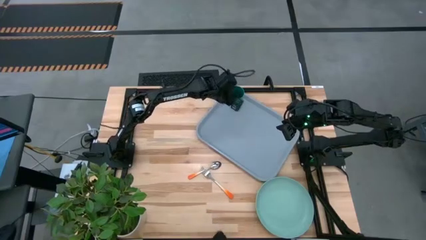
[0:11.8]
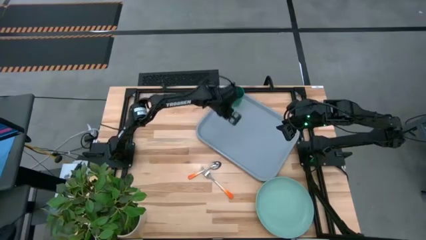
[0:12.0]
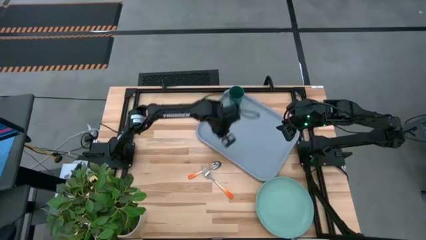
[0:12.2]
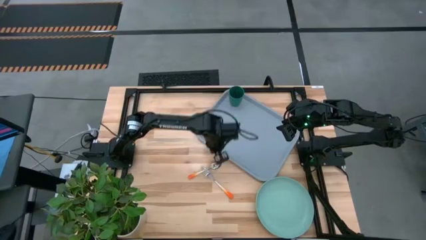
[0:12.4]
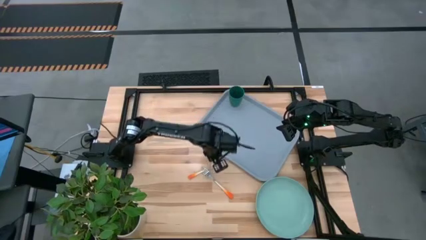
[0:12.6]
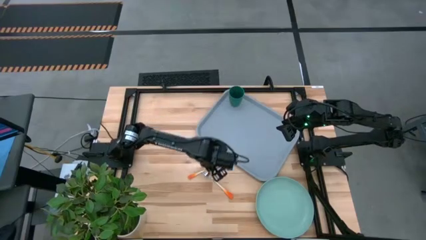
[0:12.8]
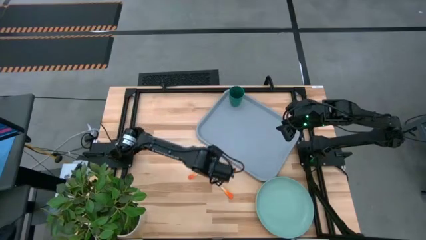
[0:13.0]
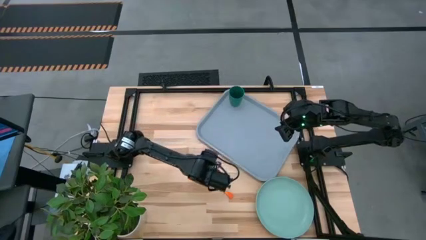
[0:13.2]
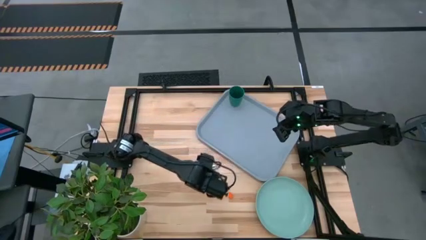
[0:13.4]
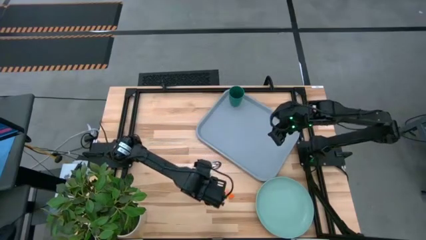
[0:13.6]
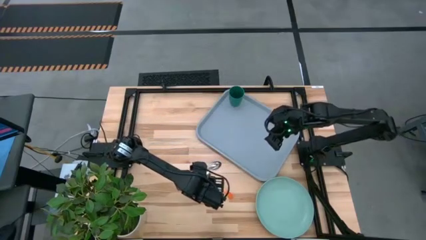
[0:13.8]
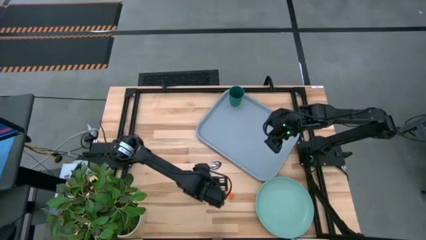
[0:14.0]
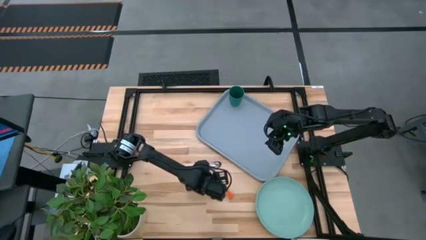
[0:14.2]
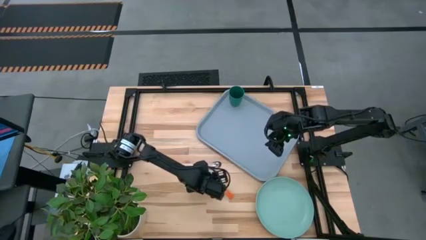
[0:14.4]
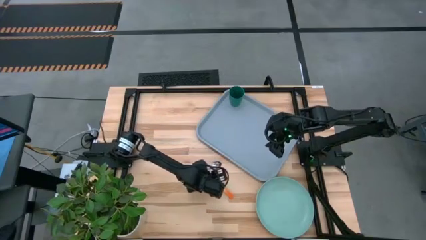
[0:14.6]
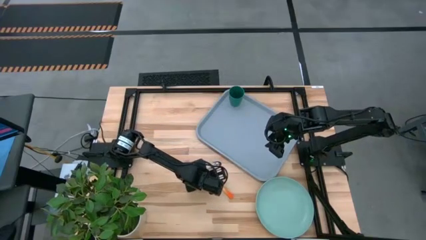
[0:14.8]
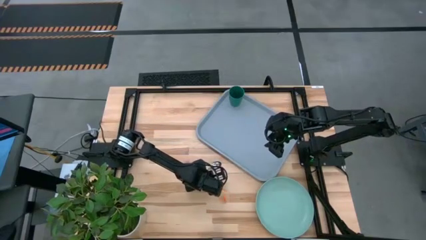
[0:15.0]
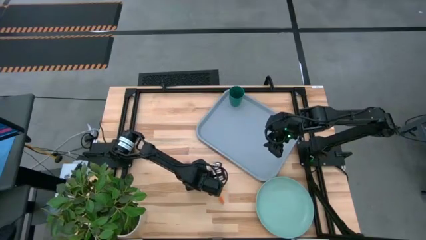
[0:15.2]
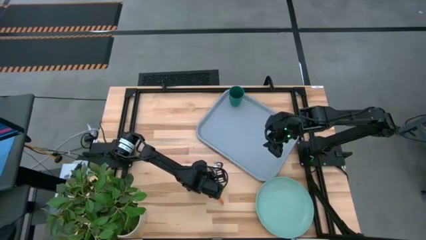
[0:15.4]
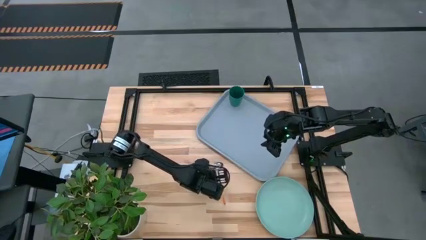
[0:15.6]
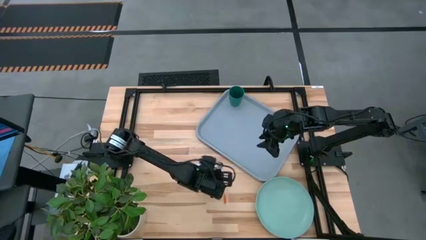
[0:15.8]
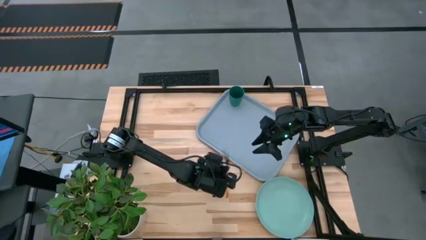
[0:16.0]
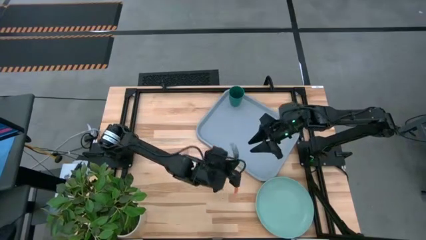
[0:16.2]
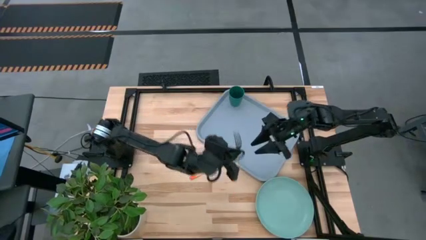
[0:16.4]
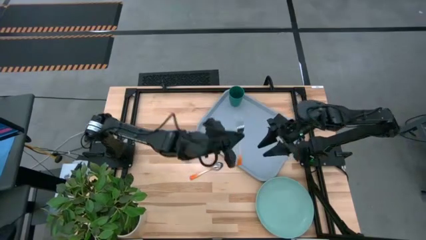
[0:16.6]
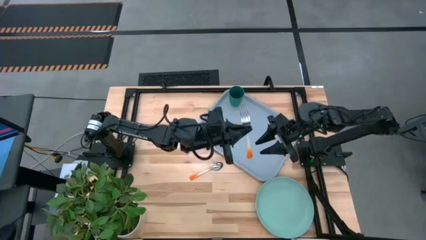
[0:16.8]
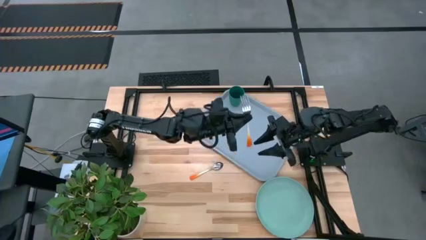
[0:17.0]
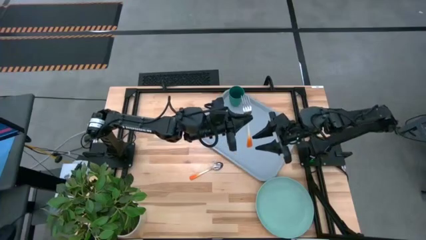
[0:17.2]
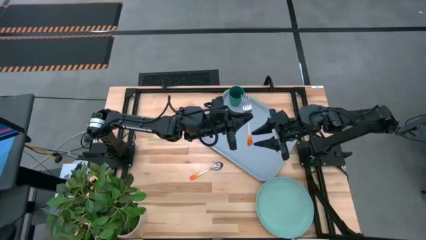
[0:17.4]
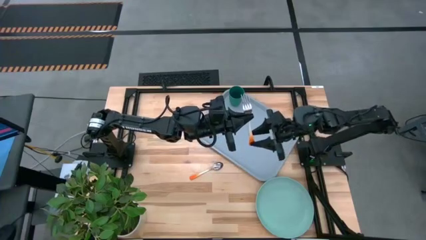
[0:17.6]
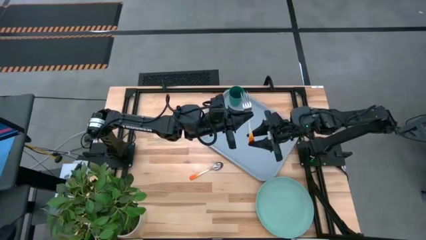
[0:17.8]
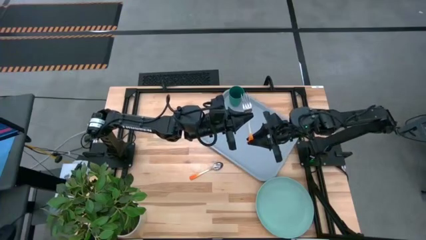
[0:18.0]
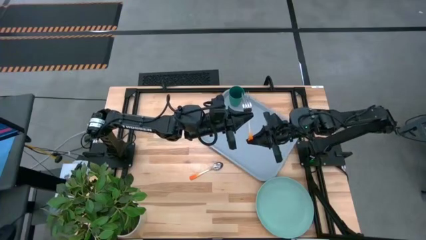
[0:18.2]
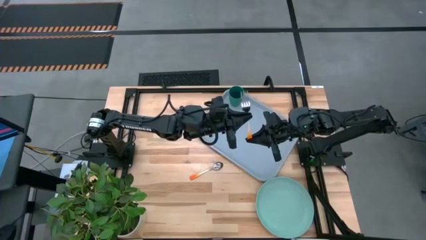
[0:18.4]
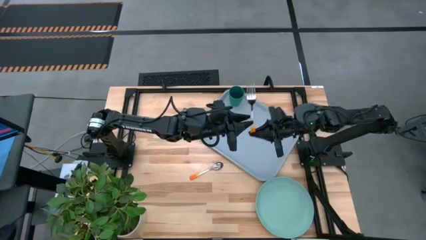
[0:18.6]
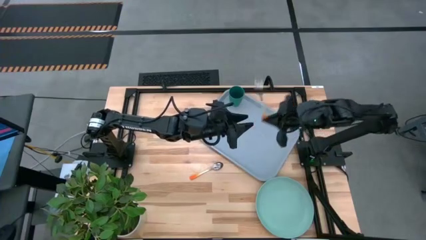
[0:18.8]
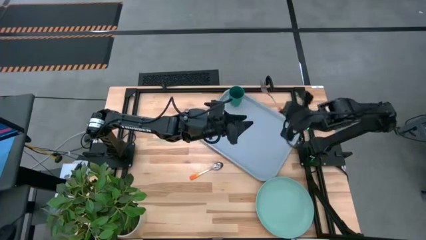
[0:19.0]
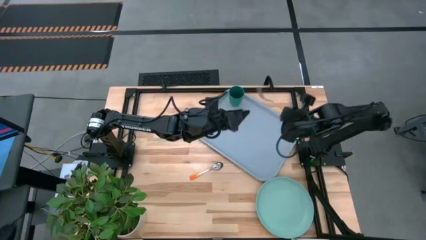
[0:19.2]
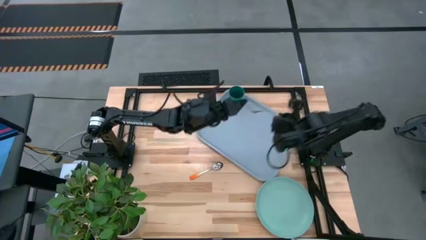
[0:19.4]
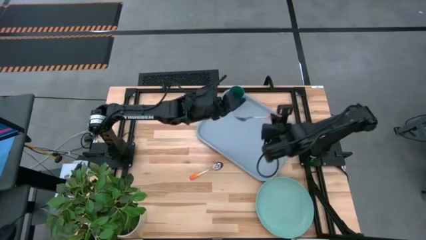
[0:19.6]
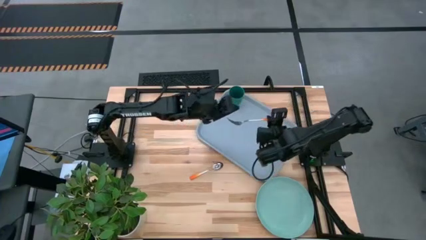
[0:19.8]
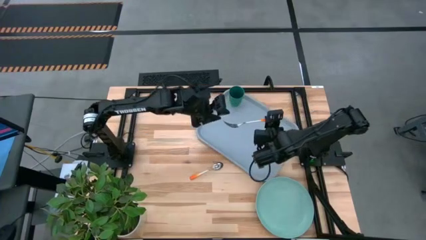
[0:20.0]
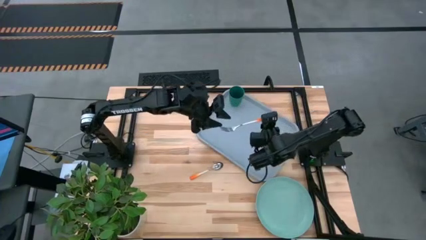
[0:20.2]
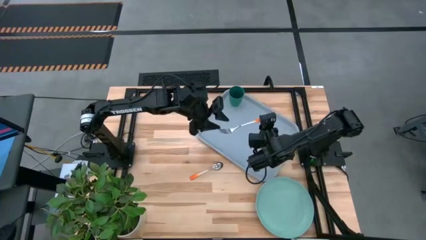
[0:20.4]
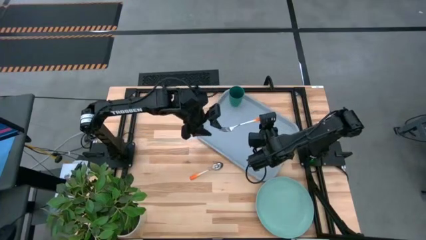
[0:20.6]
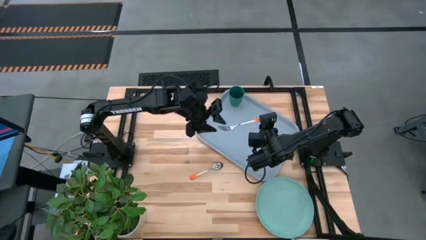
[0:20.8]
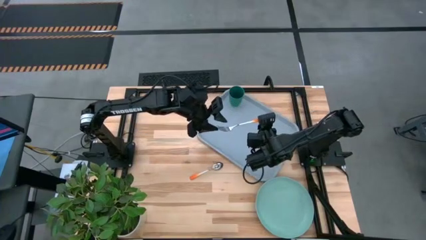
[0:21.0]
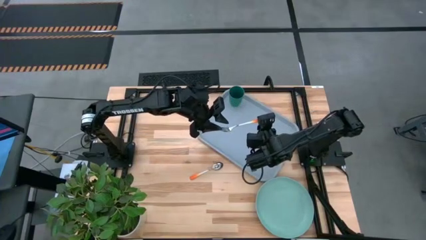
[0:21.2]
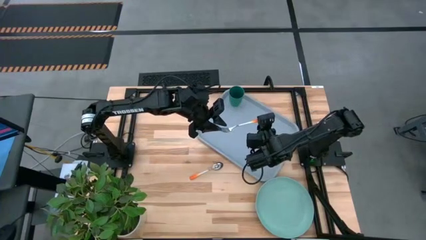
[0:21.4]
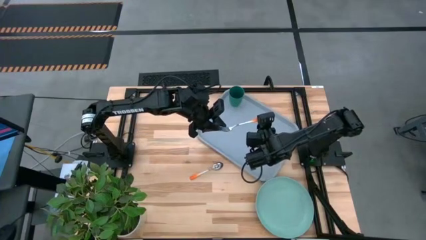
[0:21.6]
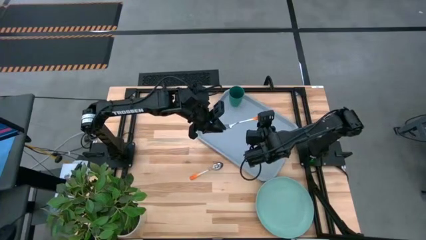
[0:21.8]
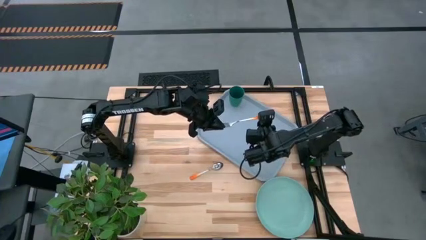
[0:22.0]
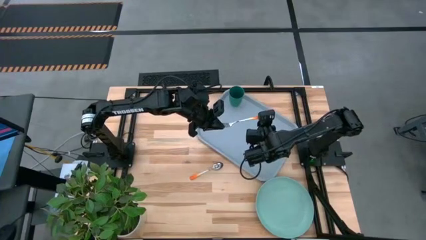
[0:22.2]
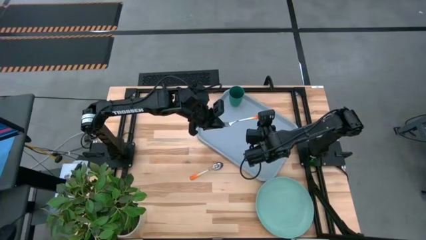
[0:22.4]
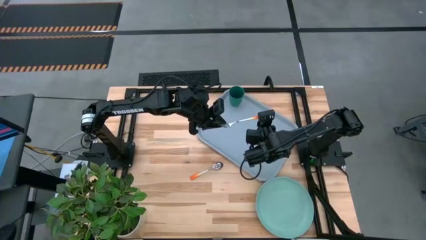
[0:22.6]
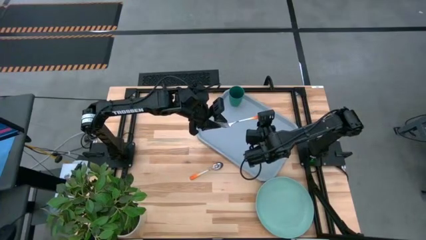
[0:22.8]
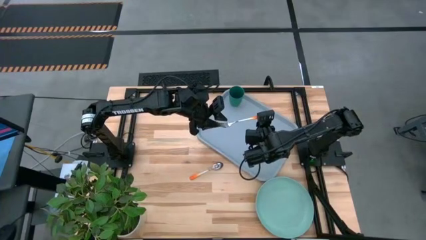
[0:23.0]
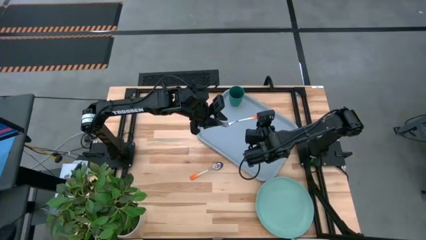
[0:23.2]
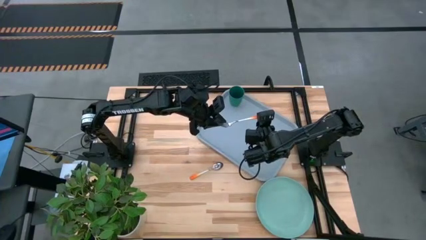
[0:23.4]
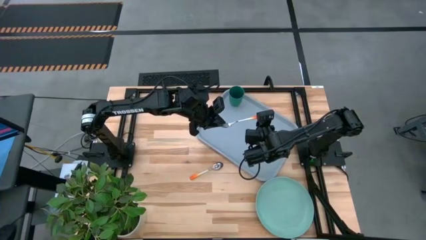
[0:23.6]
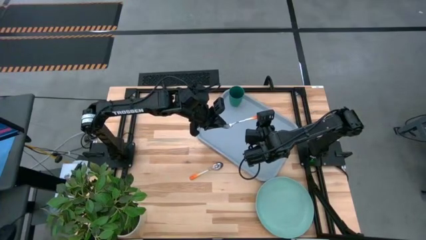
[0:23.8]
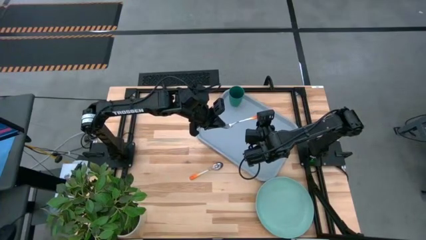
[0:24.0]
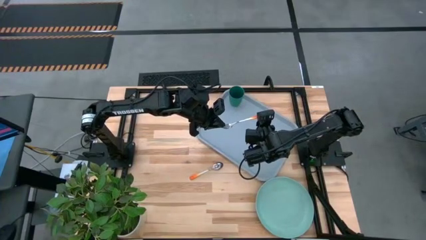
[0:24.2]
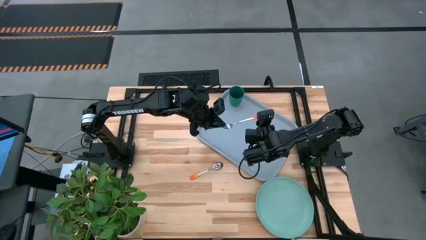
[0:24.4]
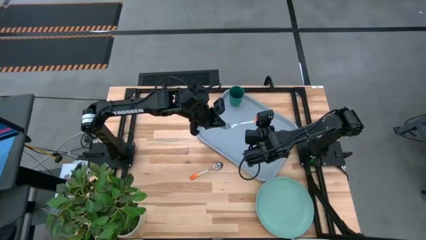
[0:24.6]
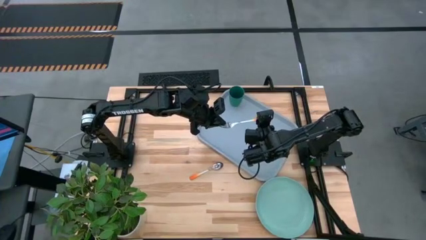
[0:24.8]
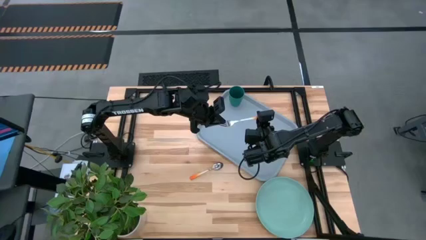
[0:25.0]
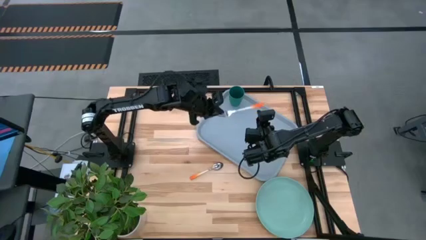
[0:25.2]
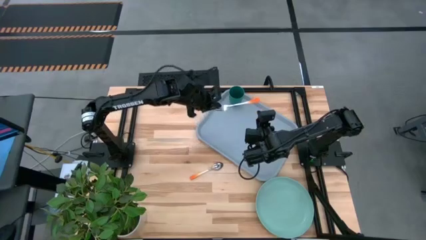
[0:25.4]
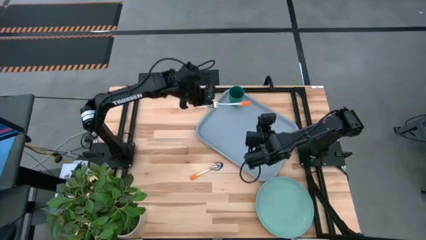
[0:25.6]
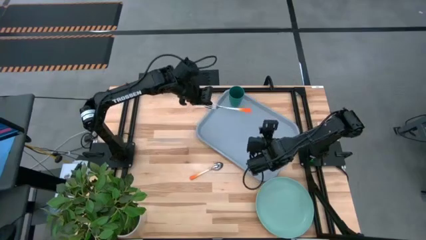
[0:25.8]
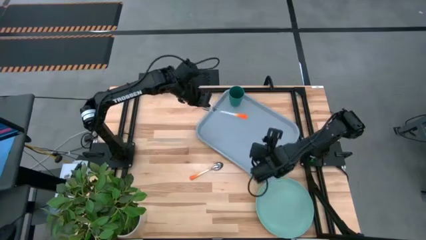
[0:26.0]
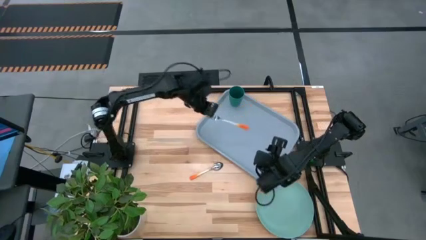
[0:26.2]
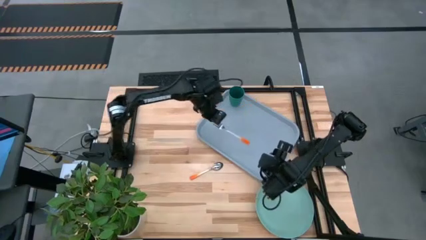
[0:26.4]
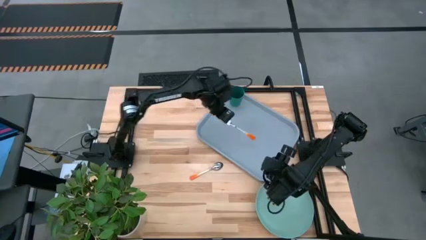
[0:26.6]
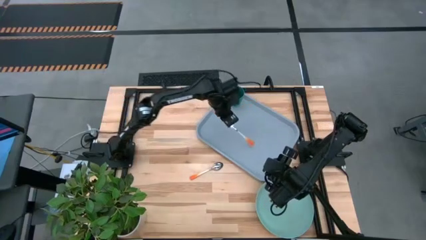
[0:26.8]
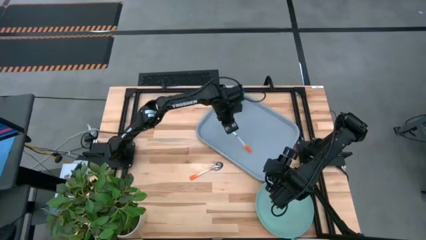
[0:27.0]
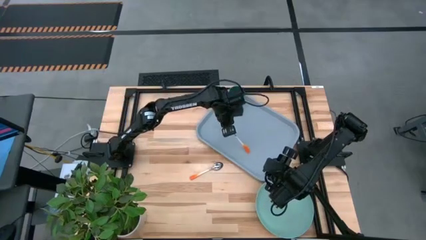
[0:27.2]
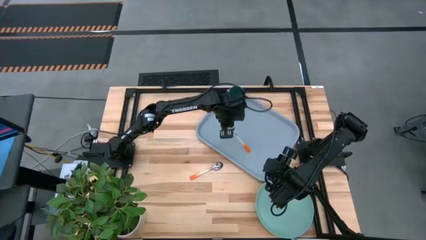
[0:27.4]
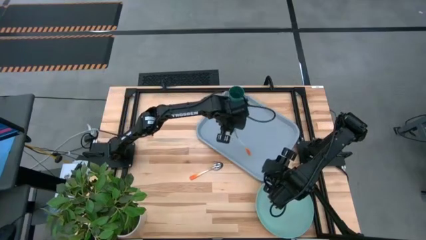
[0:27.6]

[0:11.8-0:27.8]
Task: Pick and place plate/cup/fork/spoon on tray
Put the orange fork to the right of the blue tray
